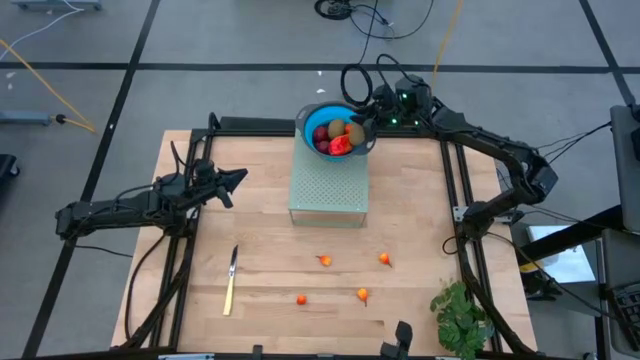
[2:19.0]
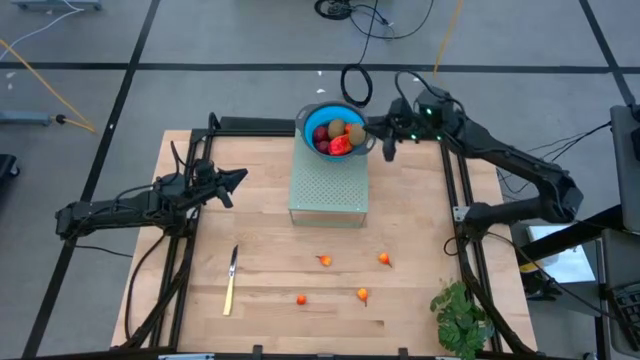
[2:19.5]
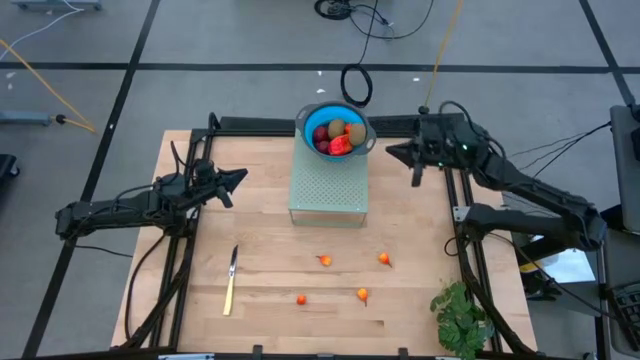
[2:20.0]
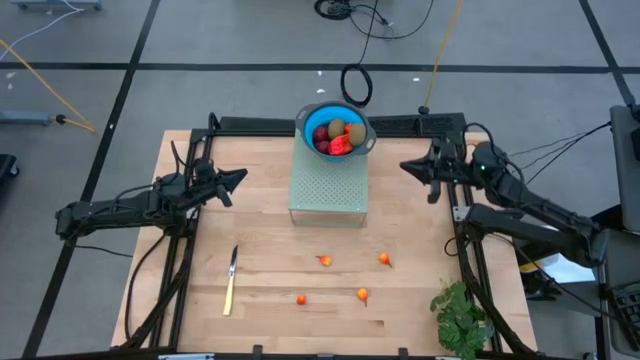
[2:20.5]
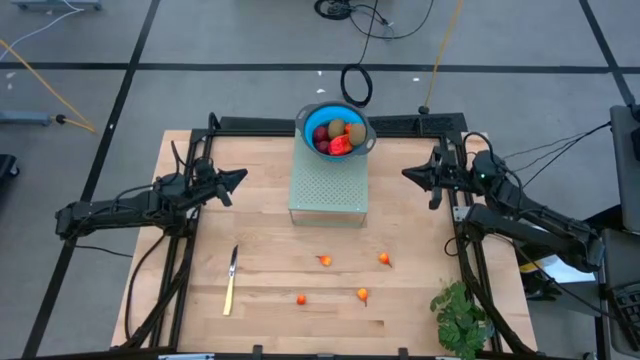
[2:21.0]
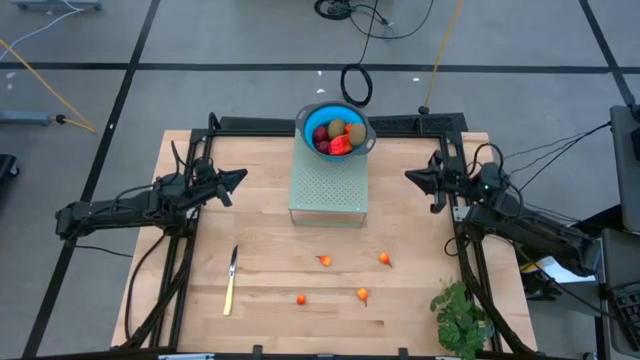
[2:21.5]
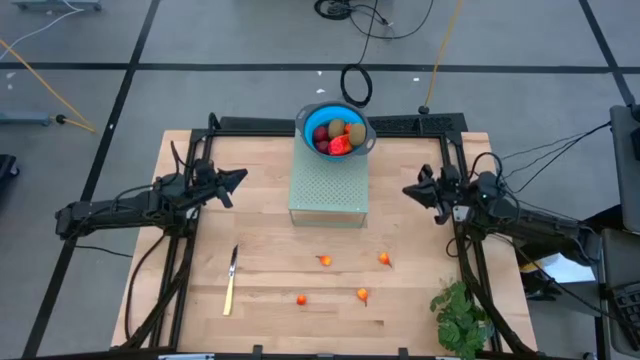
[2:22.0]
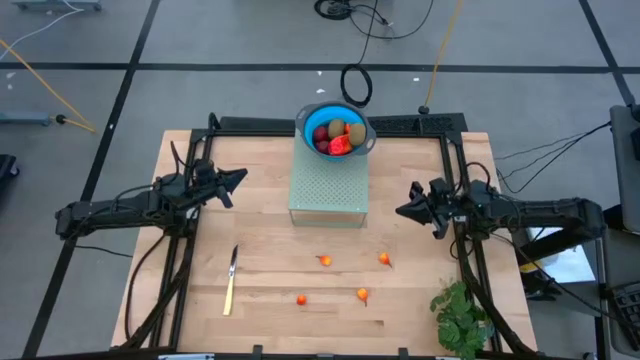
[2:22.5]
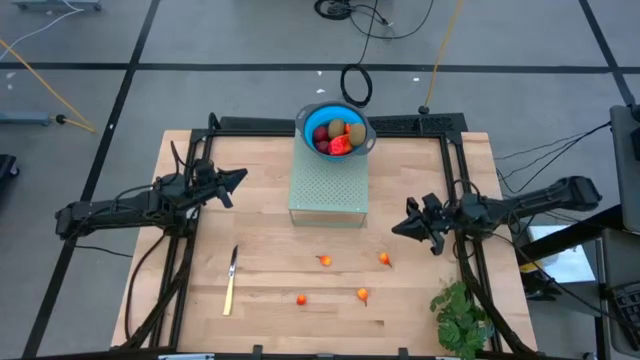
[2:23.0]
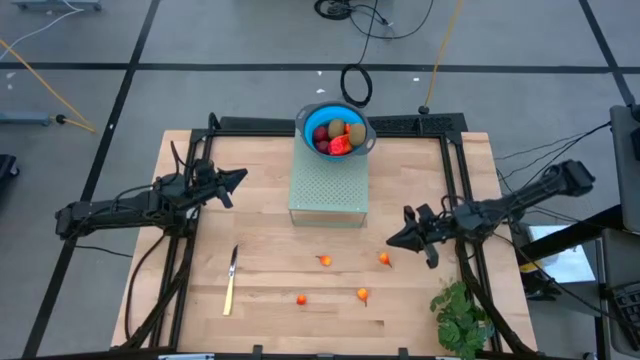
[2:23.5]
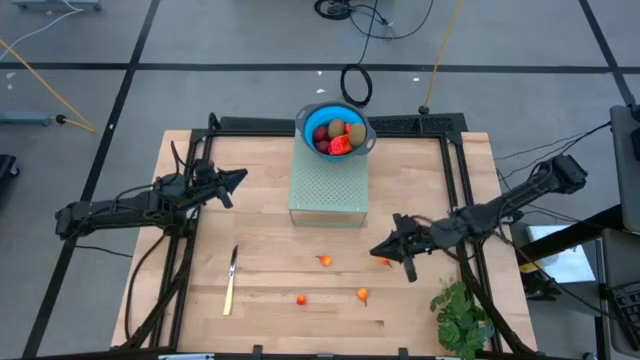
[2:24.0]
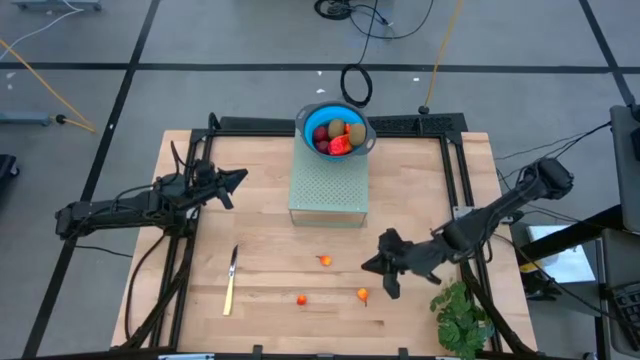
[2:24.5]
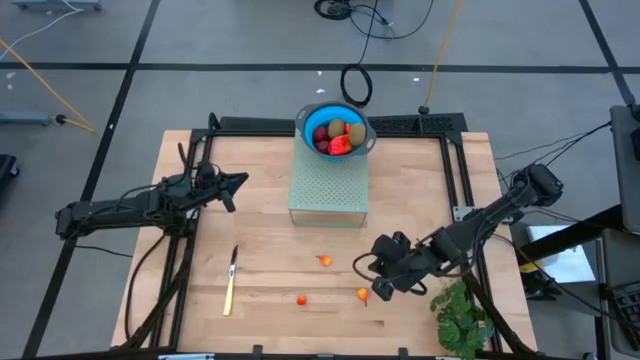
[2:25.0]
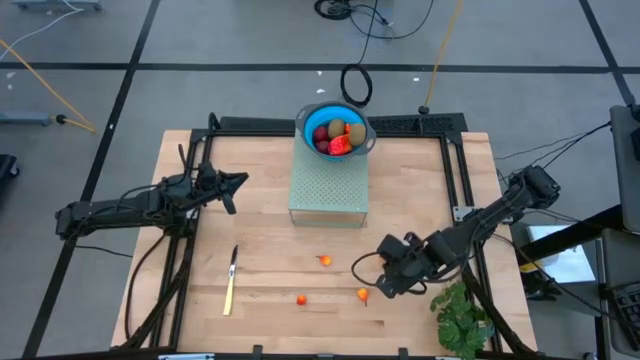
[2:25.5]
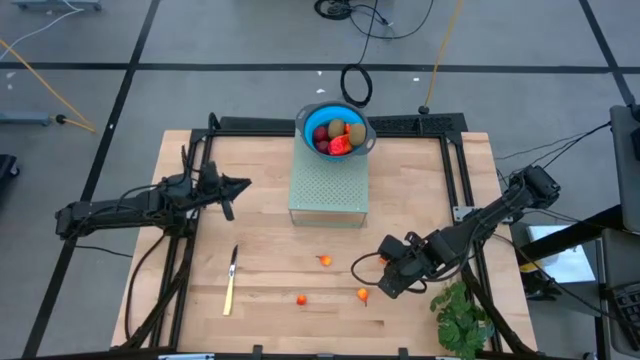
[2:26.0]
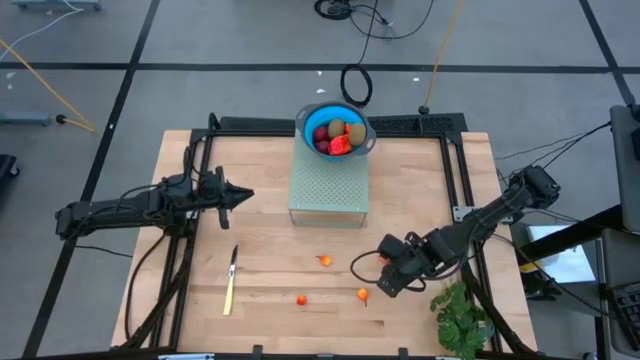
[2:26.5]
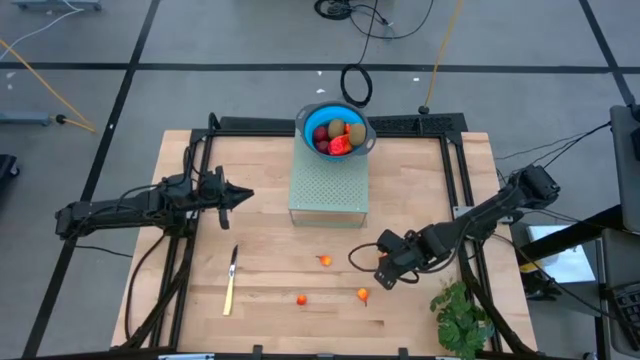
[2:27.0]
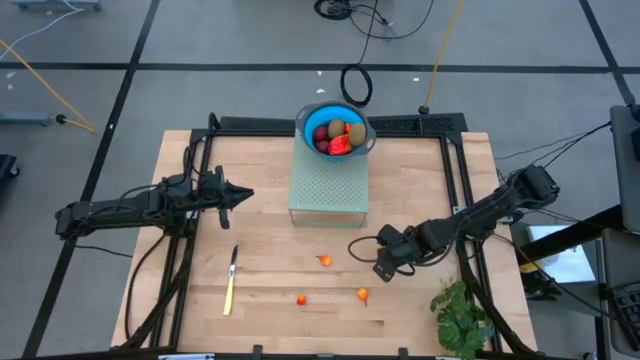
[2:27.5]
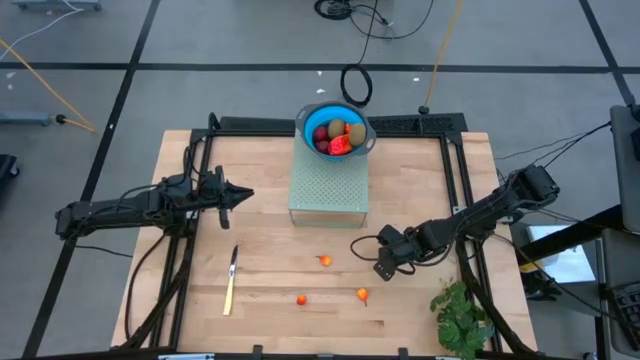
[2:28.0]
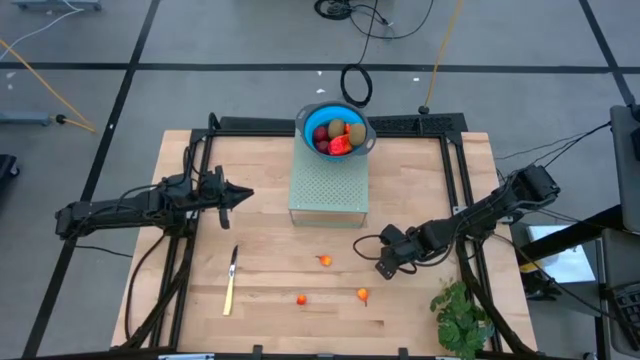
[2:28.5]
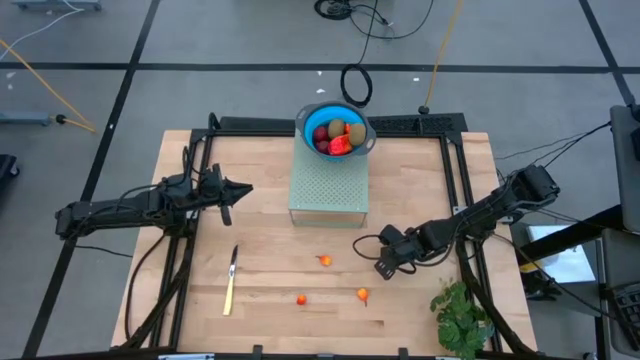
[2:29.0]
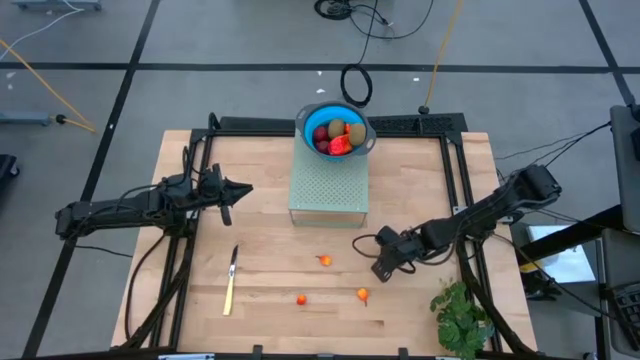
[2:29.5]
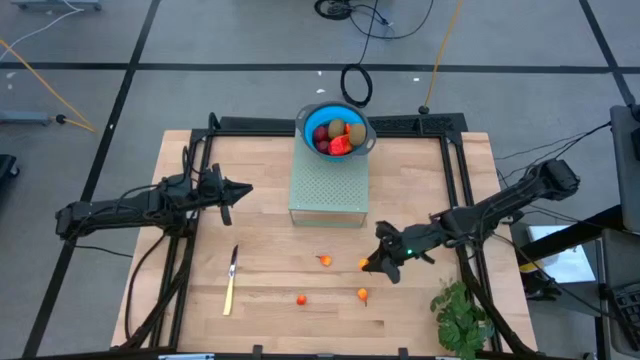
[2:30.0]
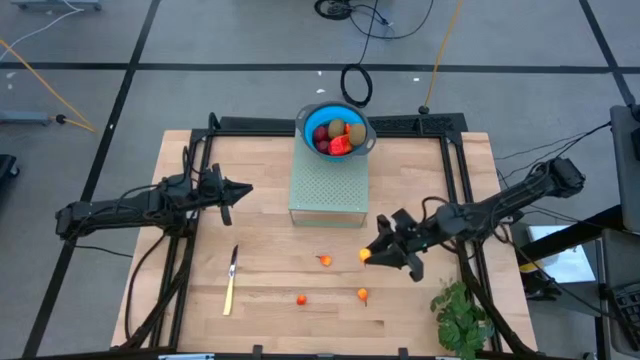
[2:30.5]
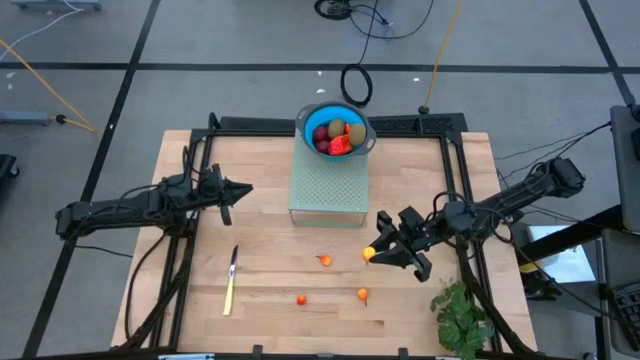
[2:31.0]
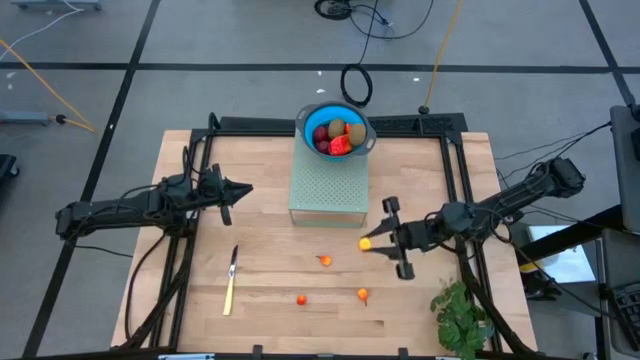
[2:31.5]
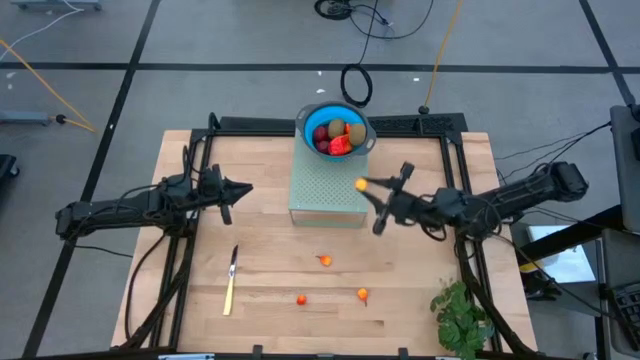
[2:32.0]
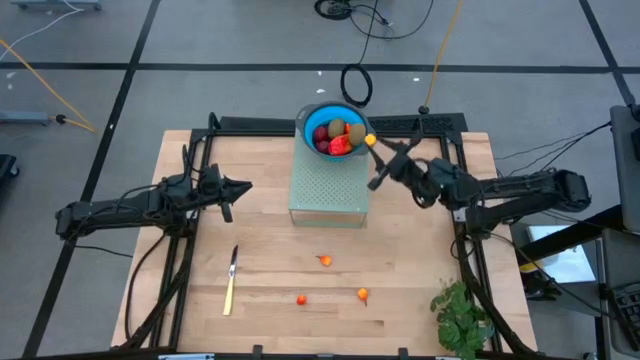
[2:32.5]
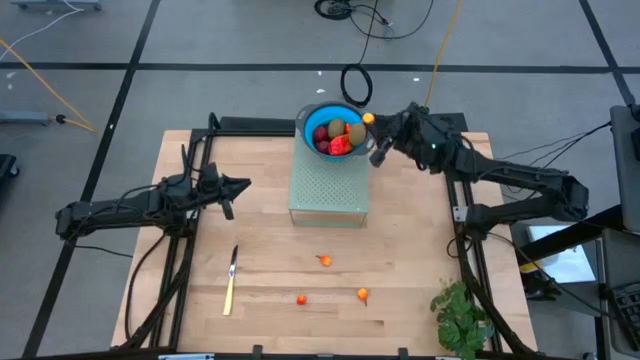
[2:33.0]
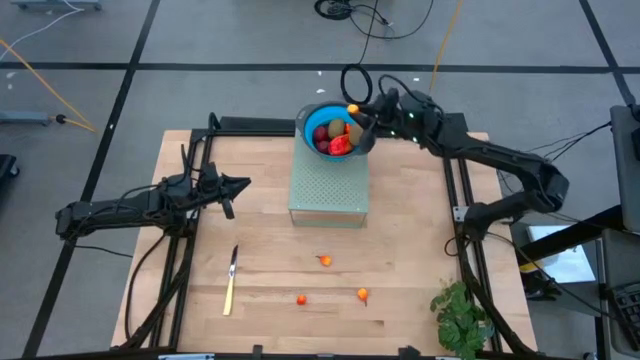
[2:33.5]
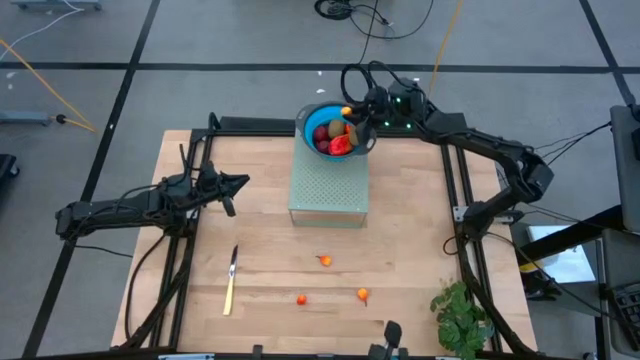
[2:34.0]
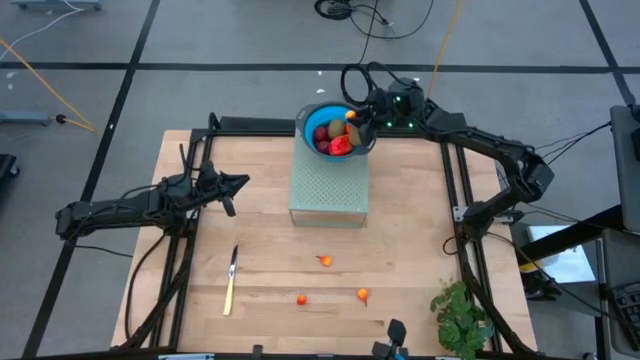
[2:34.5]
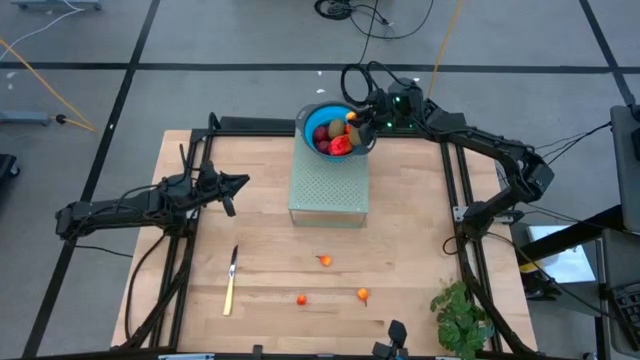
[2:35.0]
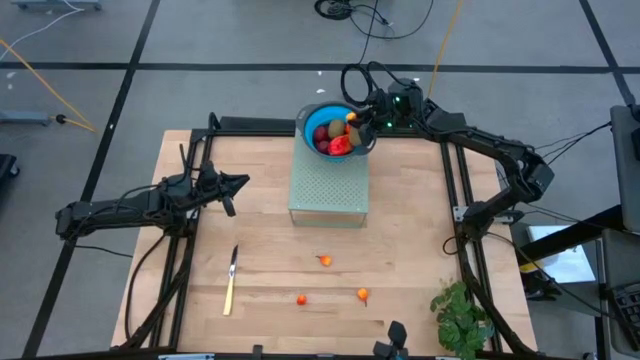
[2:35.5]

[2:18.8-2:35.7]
Task: Pick & Place Fruit
Put the peach into the blue strainer bowl on the shelf

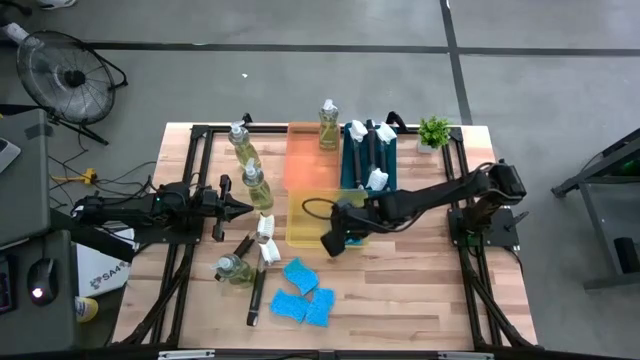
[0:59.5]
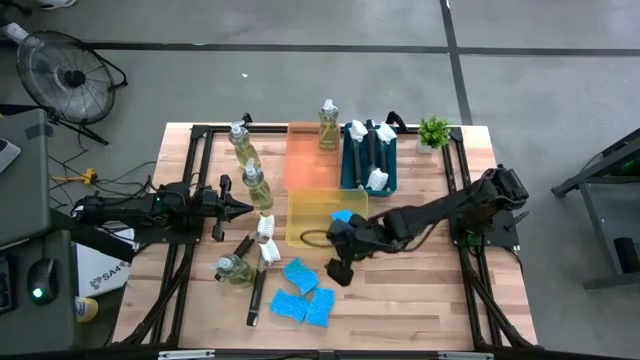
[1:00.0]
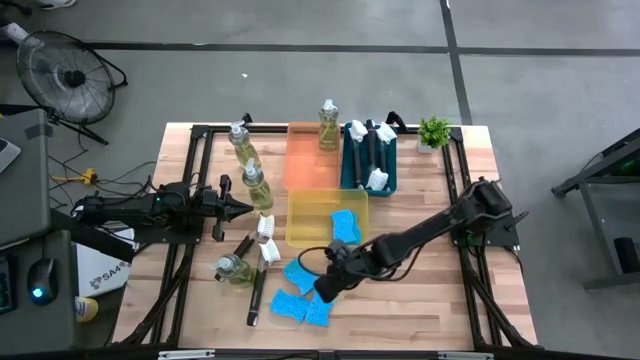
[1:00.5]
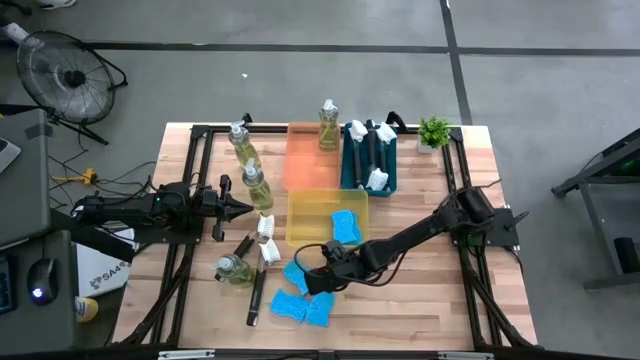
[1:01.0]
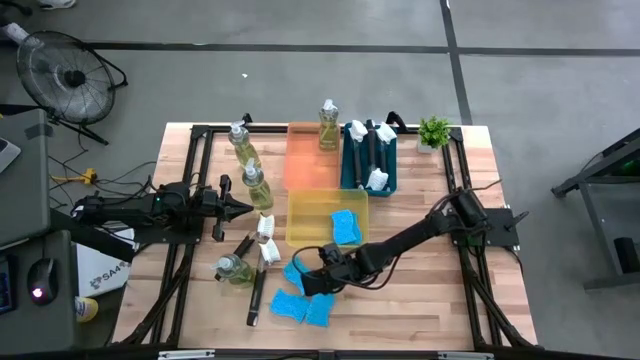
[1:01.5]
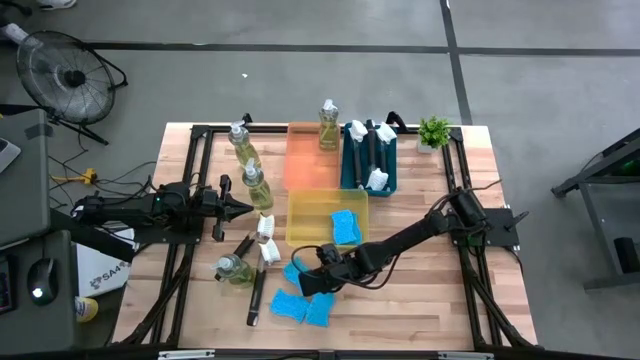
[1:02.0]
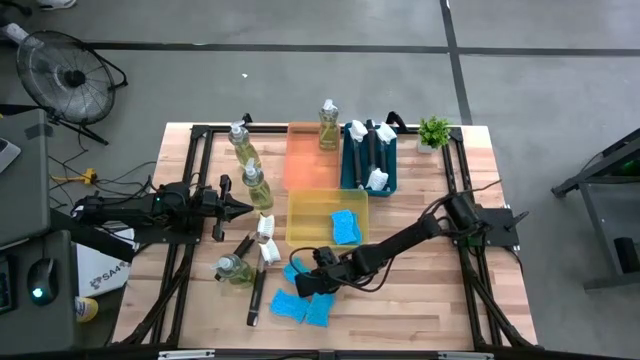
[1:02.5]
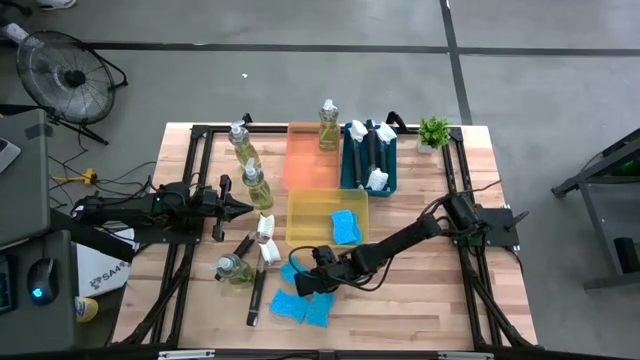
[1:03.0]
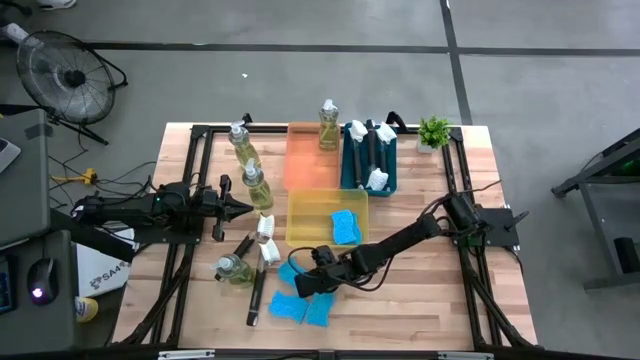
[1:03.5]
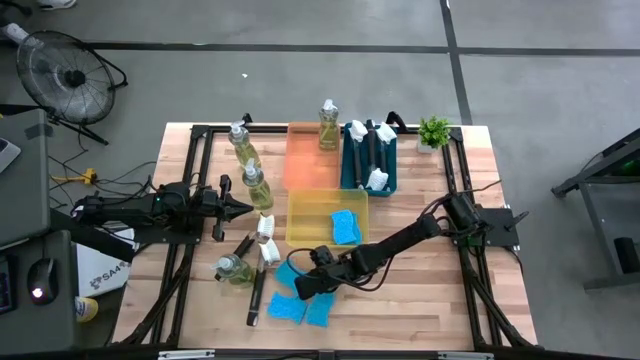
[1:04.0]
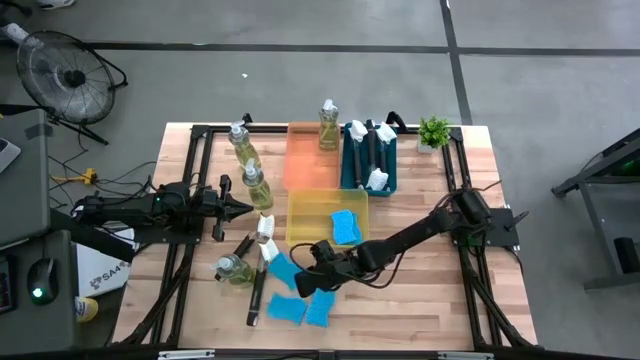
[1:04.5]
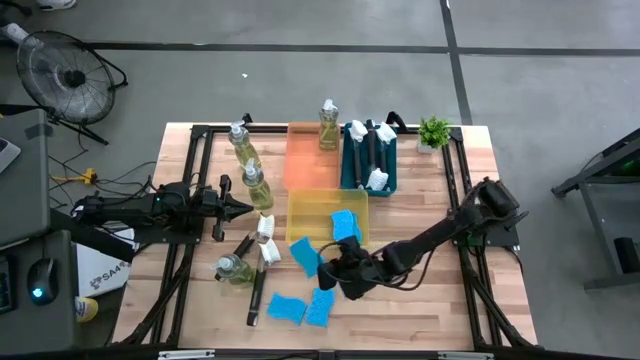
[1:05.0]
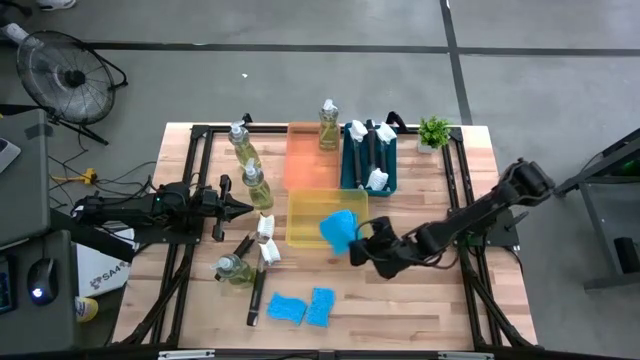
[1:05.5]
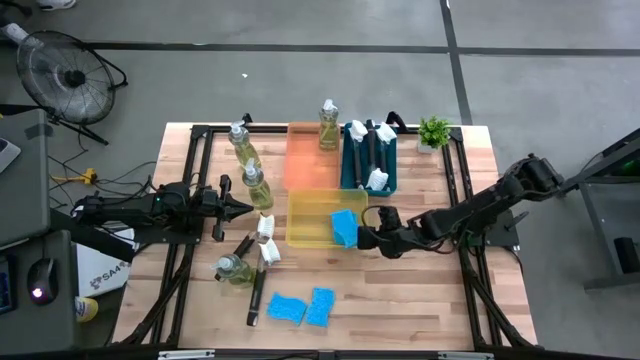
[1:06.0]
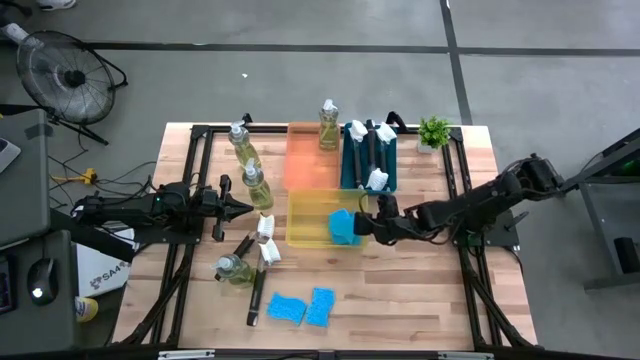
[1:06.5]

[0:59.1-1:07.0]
Task: Pick & Place Kitchen Sink Supplies
Stack the sponge on top of the sponge in the yellow bin
